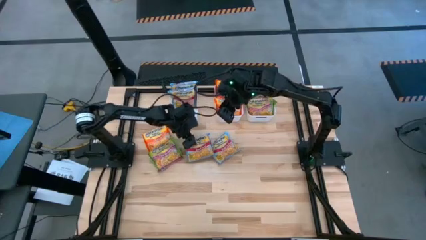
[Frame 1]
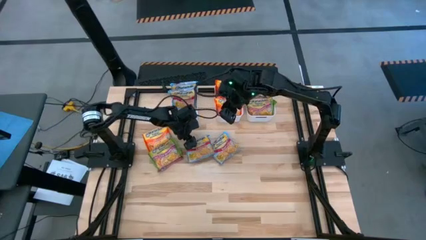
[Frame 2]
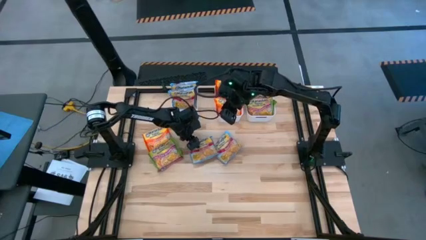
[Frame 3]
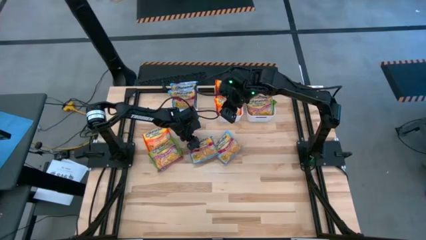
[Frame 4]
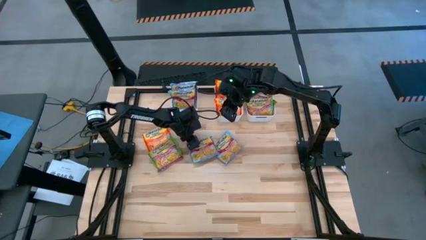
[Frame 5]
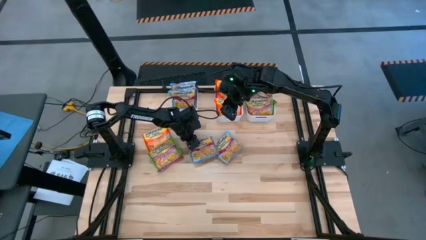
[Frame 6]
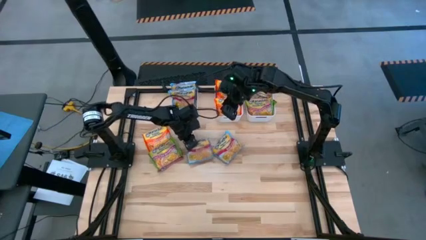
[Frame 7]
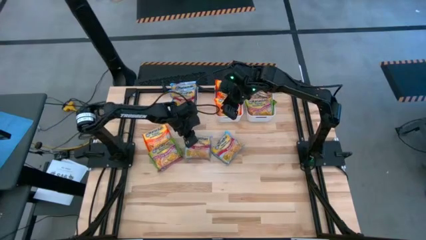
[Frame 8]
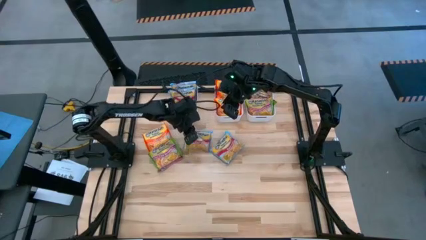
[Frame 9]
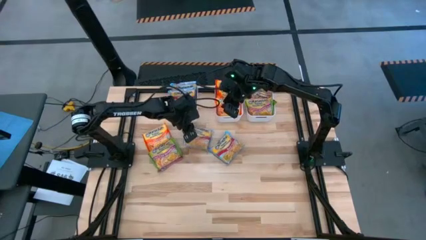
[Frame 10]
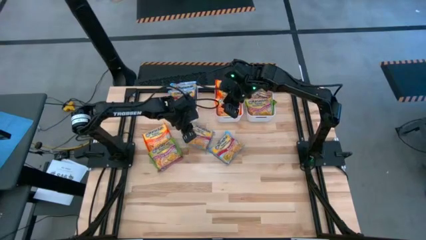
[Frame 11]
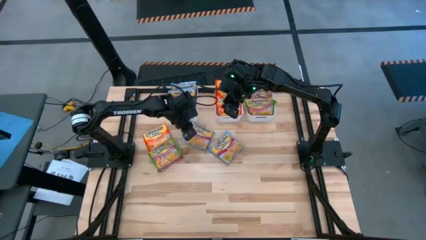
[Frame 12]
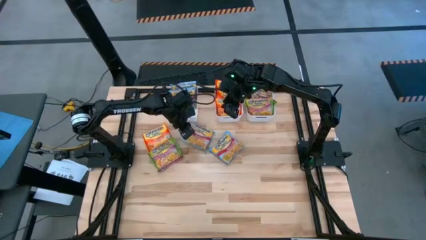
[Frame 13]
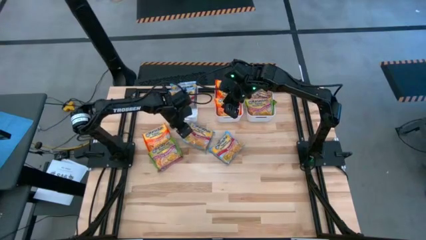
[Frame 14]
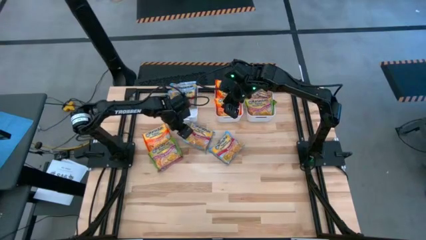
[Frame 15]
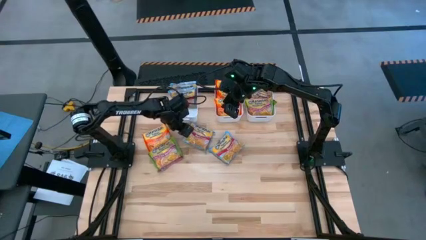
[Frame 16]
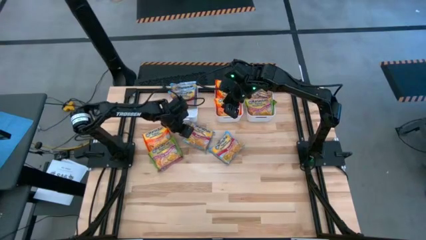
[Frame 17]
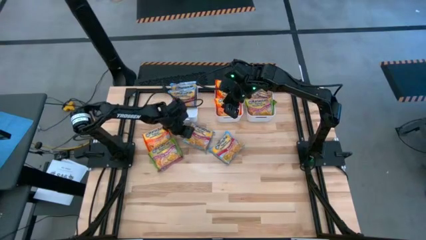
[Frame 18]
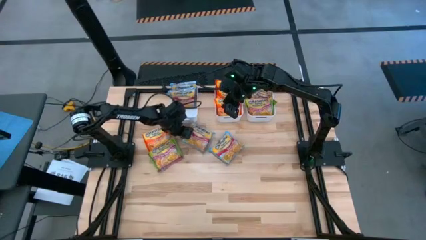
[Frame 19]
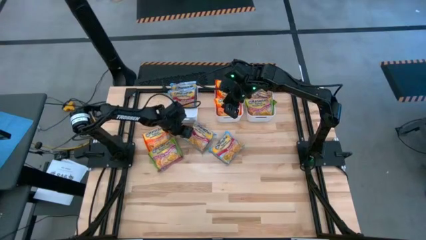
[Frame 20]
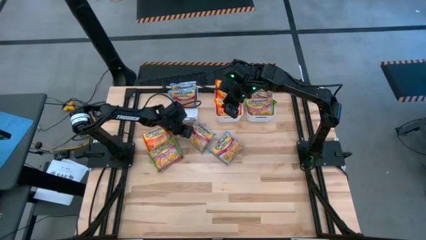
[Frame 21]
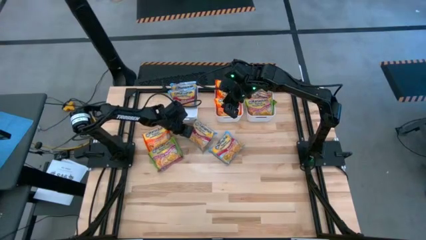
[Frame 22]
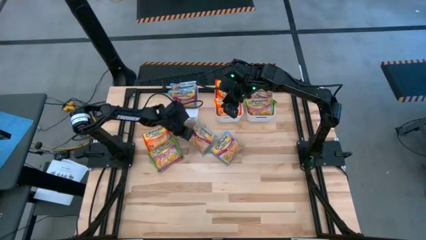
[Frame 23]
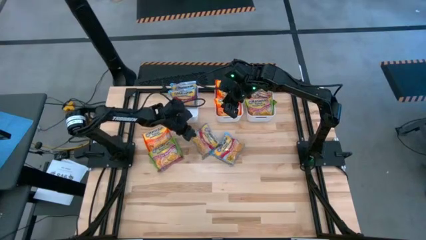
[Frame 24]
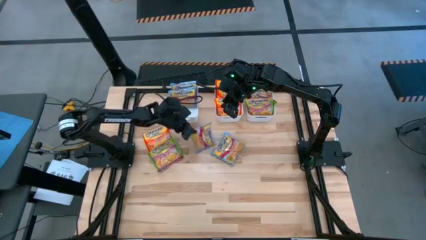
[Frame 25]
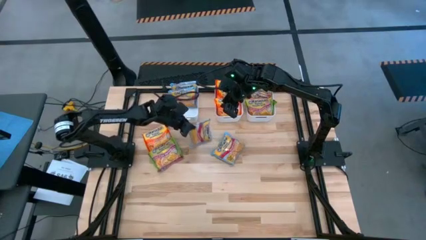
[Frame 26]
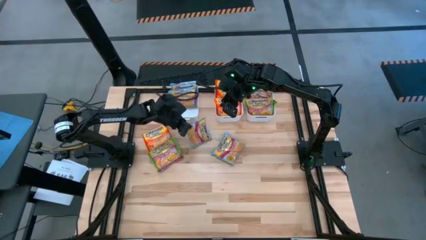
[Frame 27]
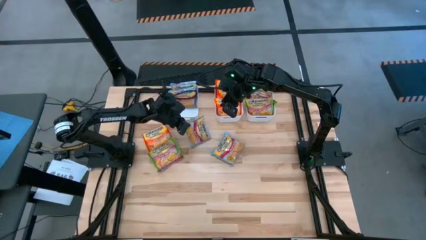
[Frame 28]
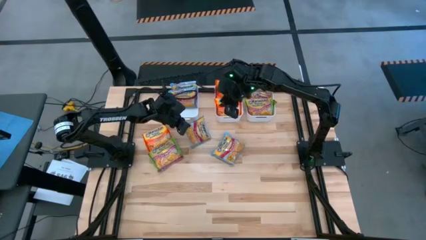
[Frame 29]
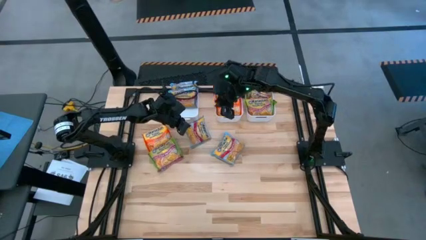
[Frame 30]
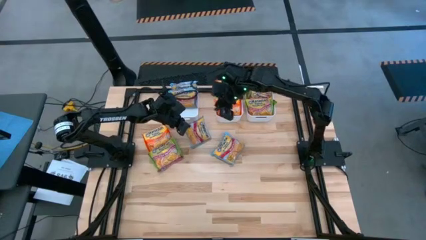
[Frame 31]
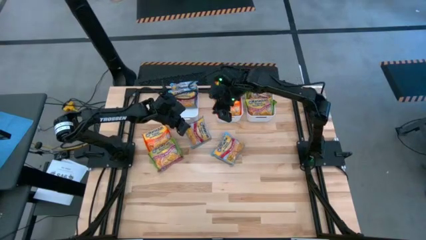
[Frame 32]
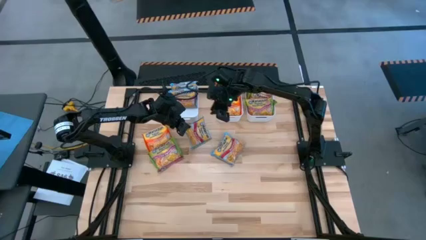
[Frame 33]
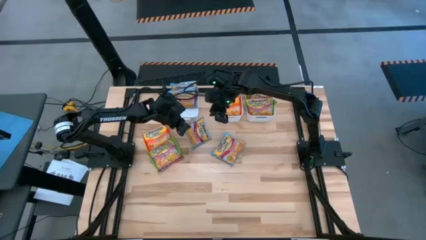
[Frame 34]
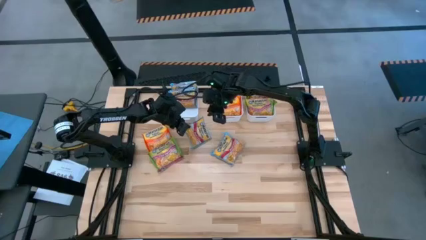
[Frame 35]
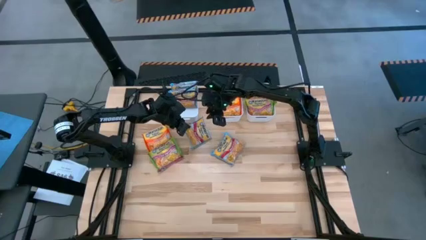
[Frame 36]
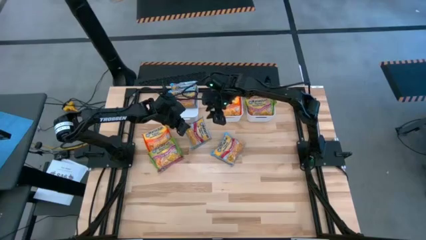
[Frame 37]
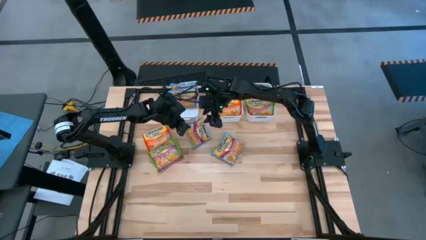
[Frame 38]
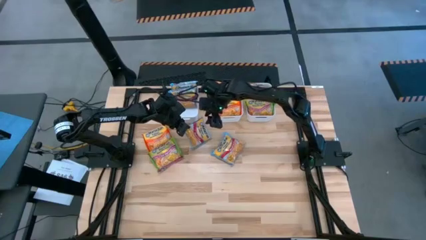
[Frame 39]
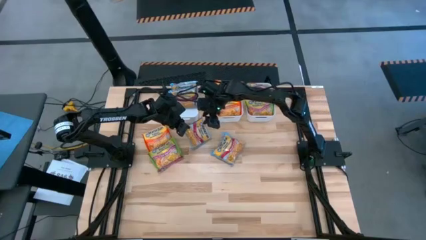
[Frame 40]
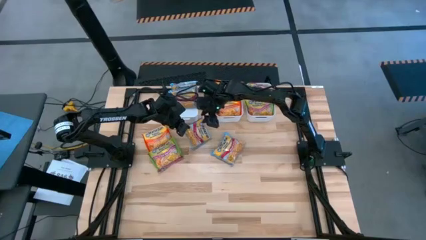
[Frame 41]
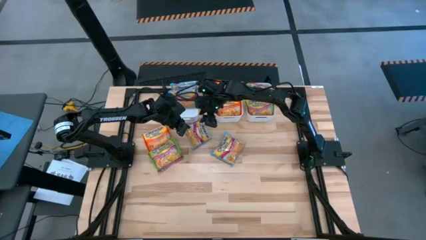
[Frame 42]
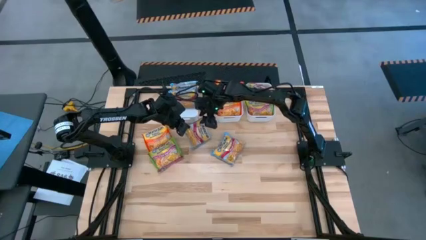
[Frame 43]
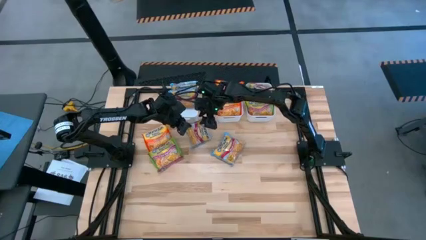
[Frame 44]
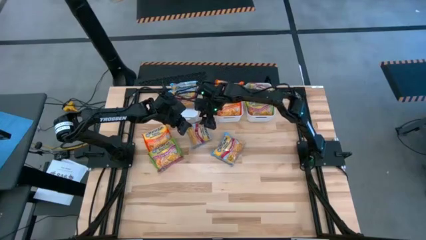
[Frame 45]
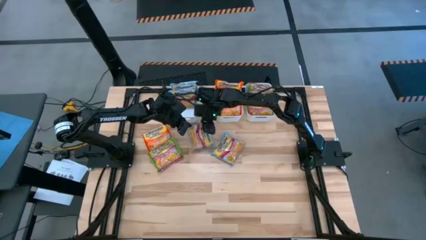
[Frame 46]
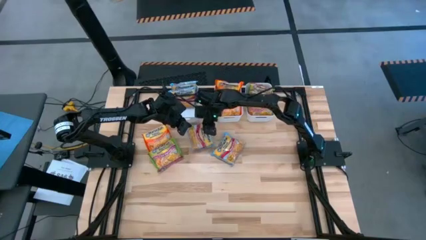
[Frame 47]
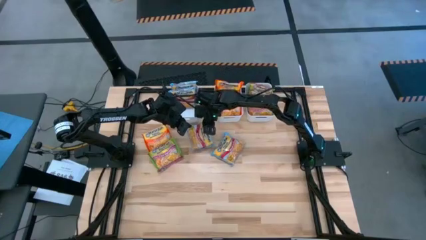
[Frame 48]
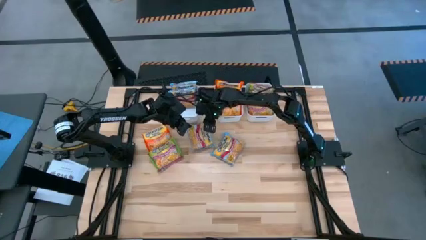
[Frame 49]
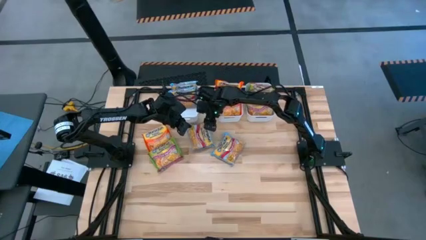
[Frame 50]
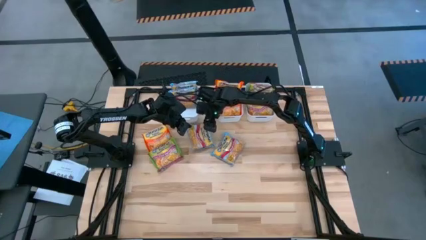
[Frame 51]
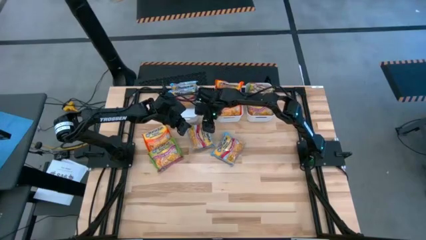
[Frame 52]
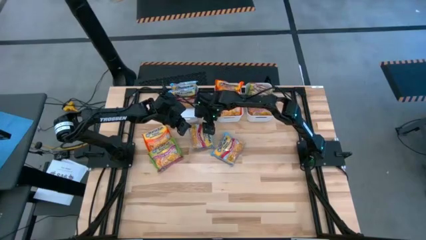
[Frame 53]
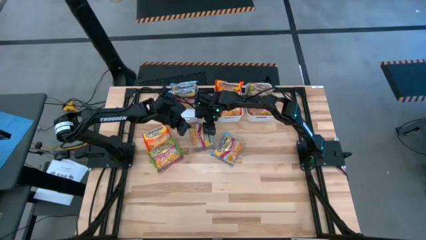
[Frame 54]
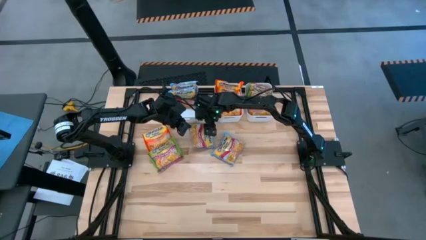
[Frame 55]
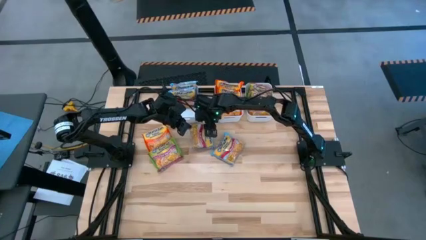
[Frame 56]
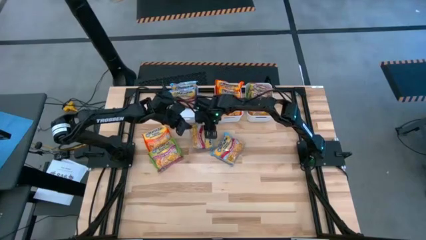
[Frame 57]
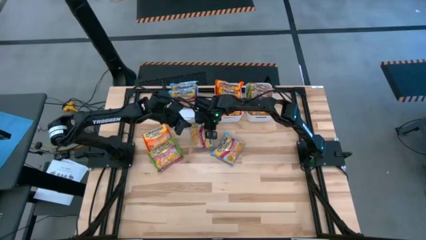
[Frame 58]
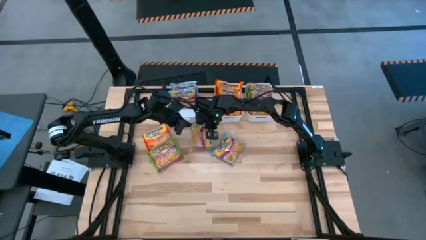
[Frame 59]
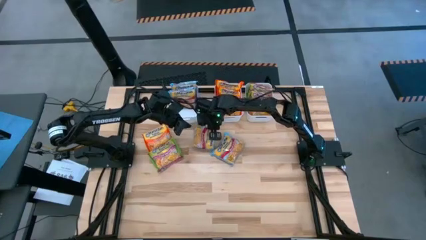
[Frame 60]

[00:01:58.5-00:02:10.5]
Task: Sort Maruchan noodles
Put the blue noodle pack into the left white bin
